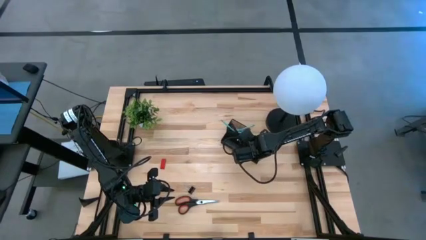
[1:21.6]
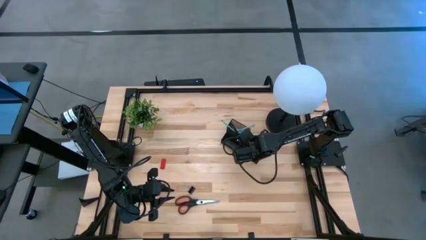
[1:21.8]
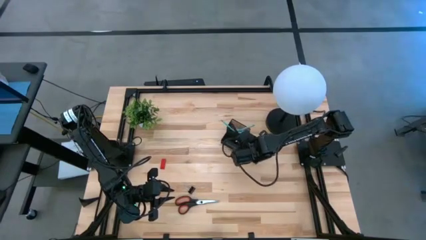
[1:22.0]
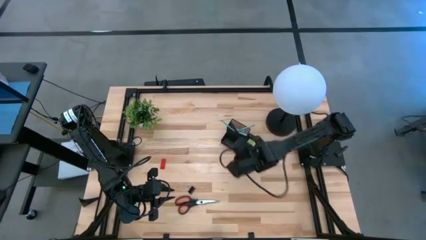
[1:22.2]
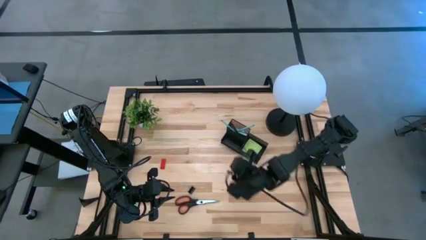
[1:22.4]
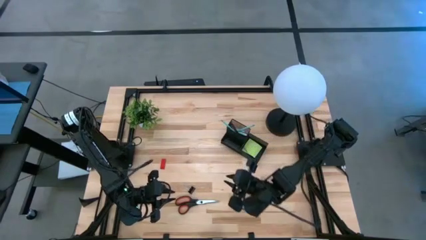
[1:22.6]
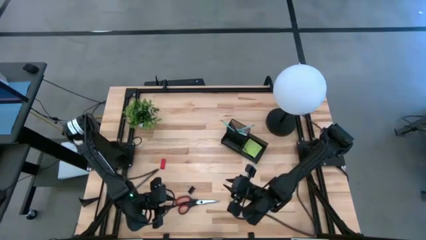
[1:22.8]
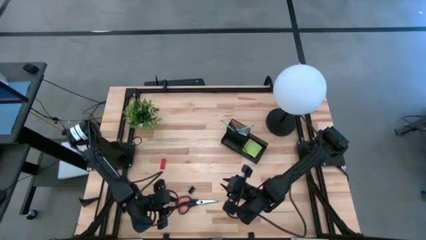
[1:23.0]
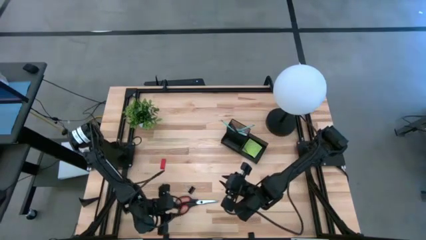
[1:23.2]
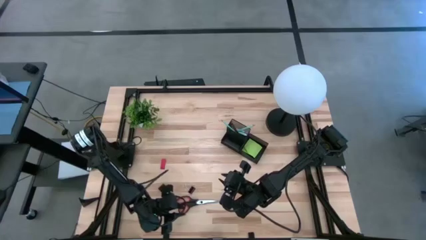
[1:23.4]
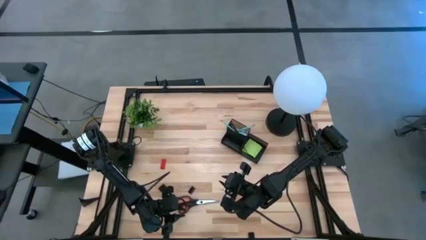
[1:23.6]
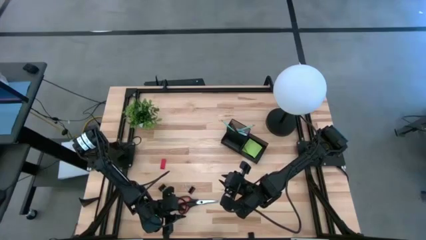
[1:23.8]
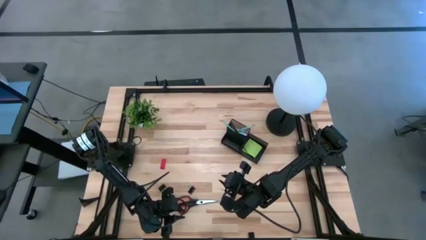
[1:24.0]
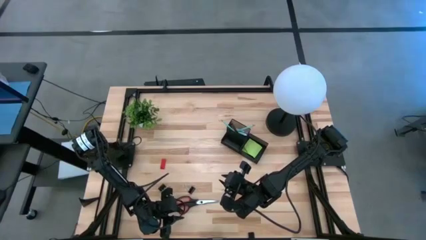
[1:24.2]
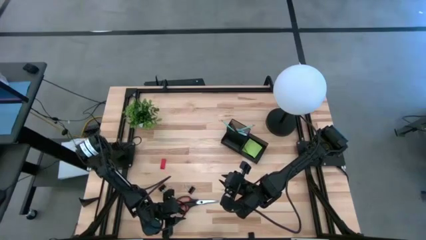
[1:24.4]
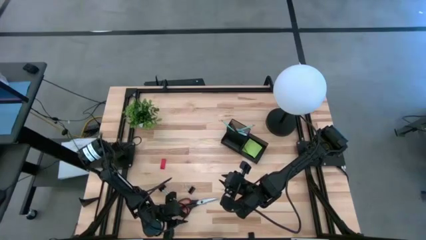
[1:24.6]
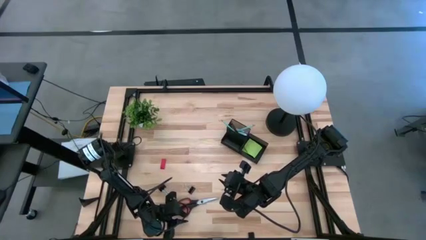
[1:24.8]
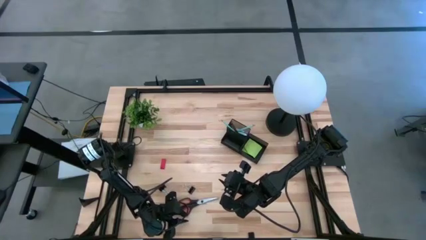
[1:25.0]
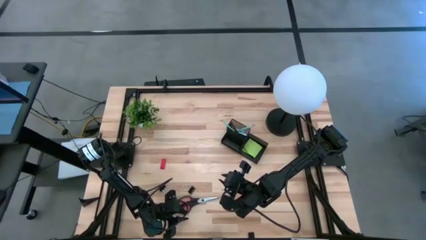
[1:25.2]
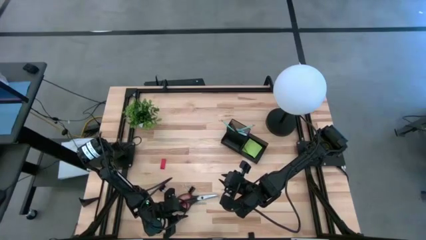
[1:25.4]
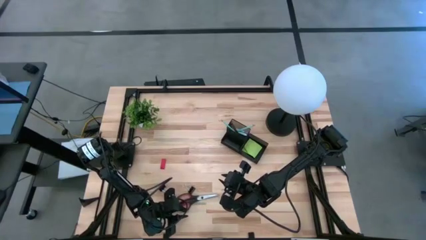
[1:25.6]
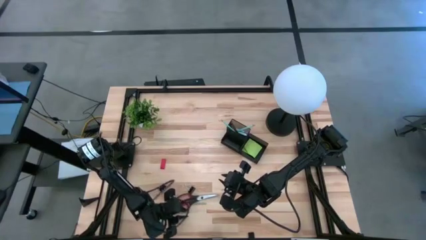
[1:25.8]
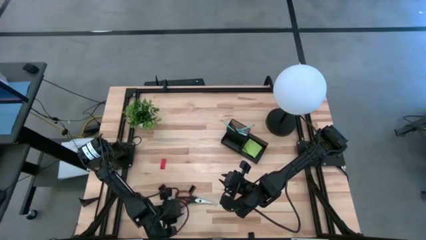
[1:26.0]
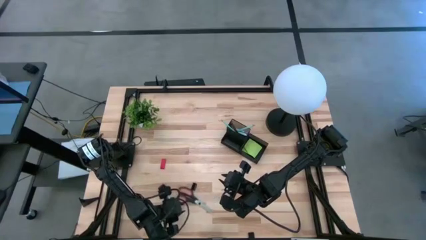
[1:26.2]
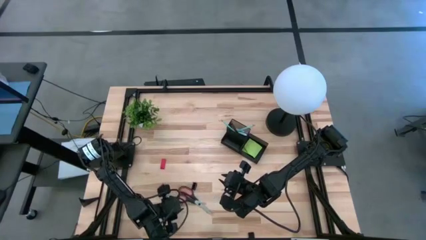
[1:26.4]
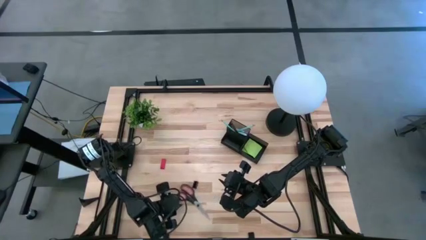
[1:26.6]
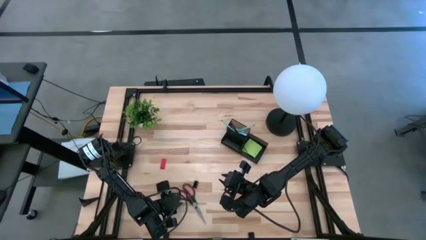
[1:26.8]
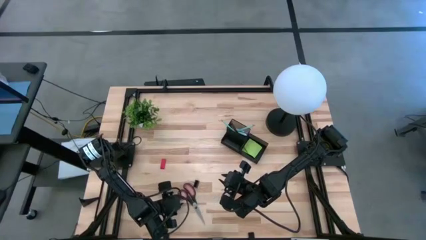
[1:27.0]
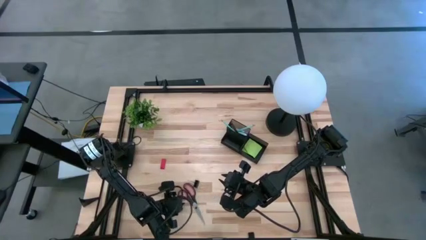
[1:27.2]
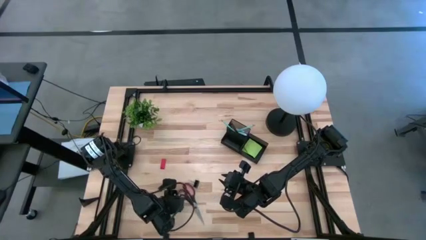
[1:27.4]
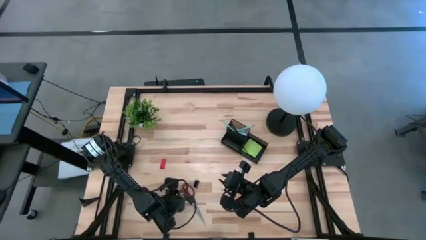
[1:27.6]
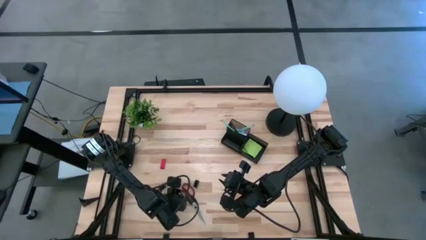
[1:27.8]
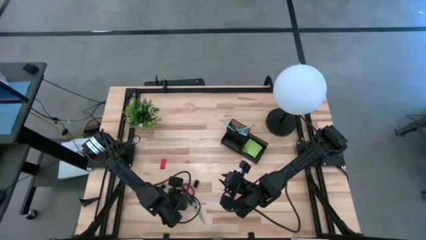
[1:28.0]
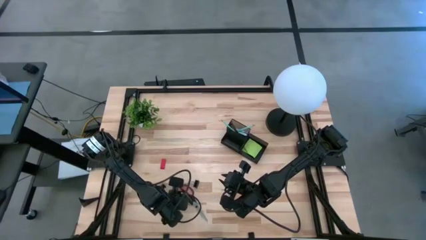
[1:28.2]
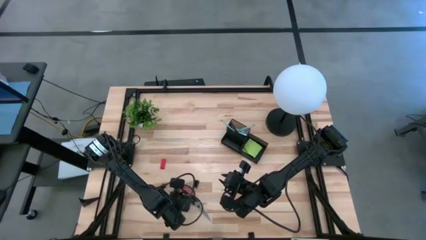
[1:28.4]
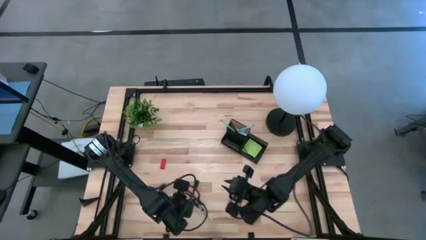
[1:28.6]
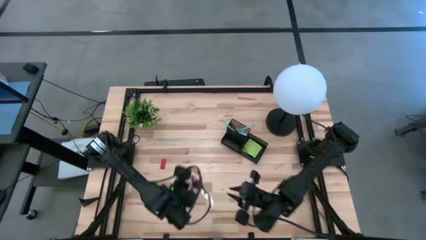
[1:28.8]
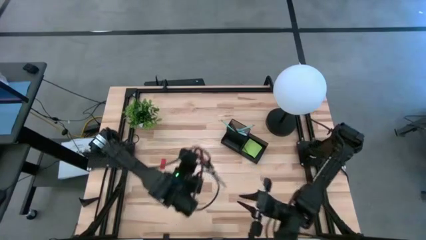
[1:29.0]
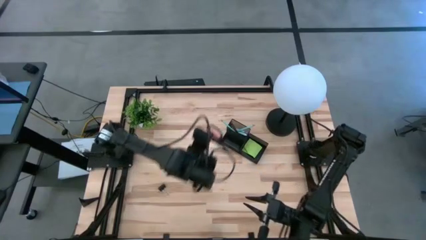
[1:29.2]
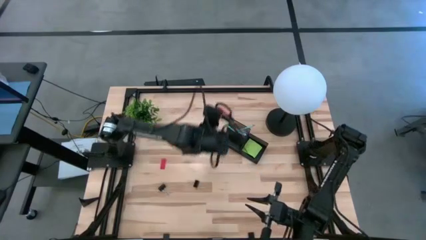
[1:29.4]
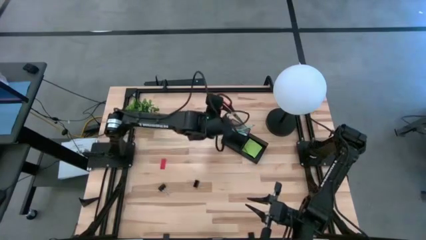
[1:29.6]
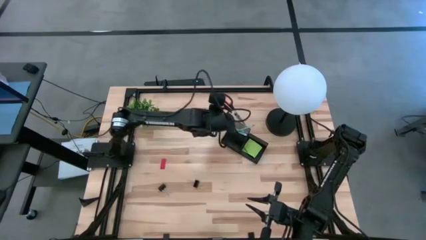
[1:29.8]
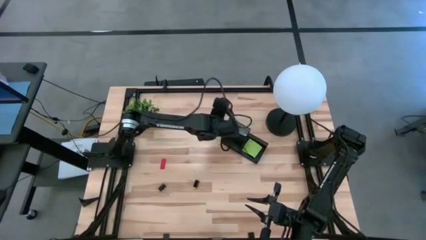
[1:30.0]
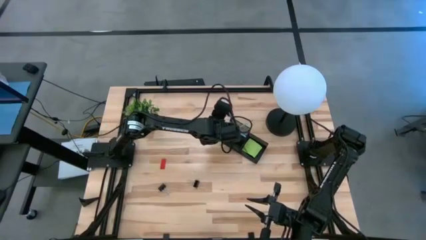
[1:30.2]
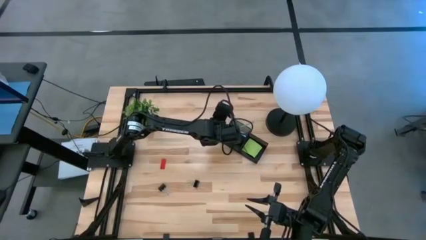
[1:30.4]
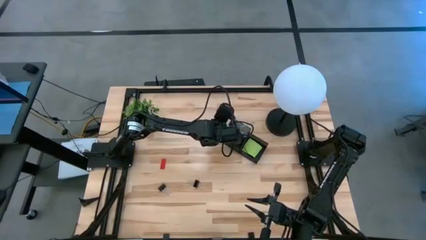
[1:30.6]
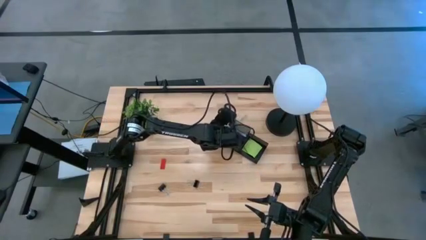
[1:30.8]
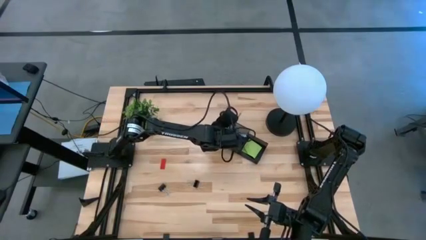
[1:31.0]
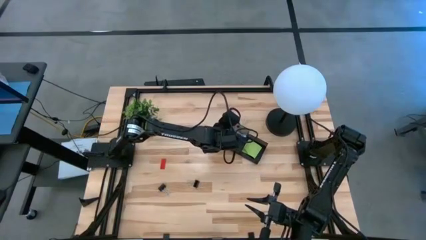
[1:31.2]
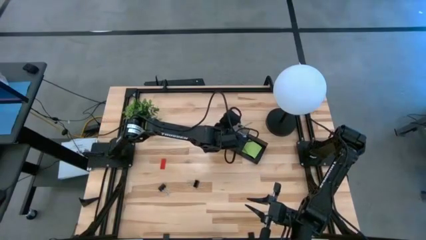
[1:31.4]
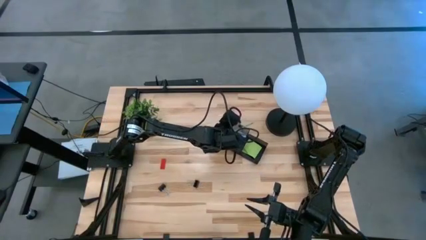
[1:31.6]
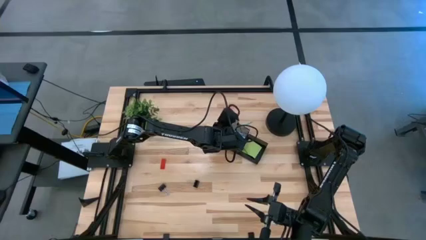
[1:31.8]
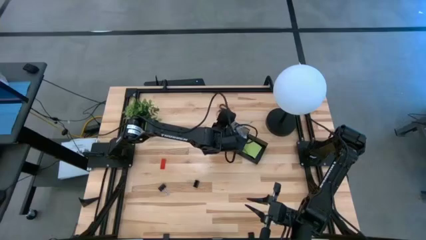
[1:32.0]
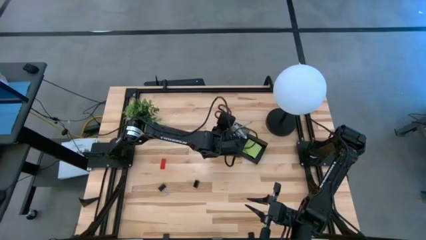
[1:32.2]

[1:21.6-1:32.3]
Task: Pick and place office supplies into organizer
Put the black scissors into the desk organizer

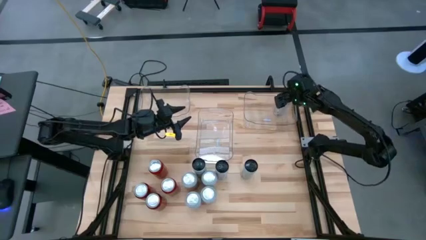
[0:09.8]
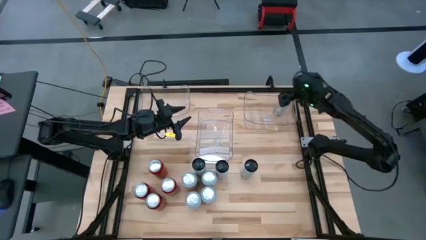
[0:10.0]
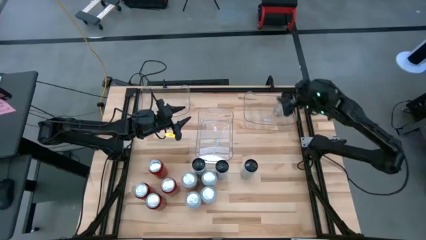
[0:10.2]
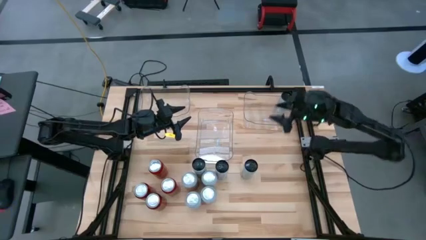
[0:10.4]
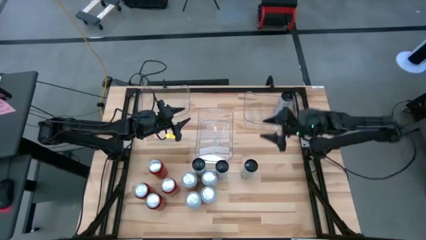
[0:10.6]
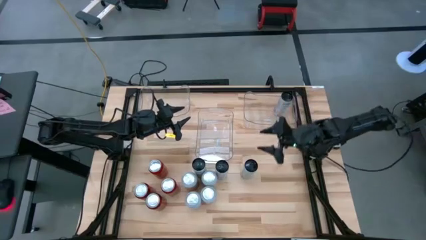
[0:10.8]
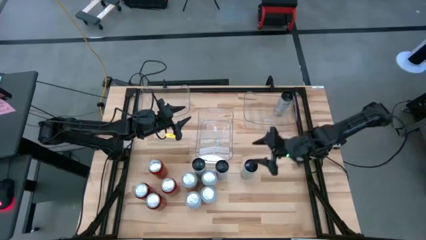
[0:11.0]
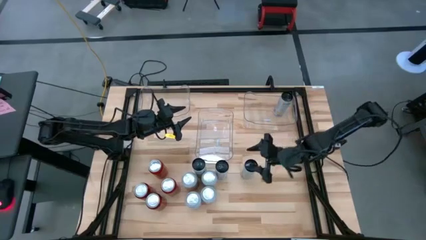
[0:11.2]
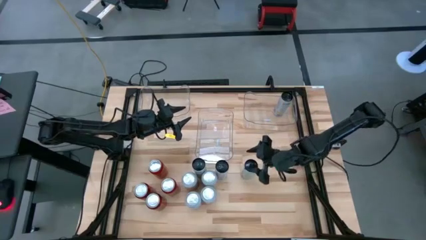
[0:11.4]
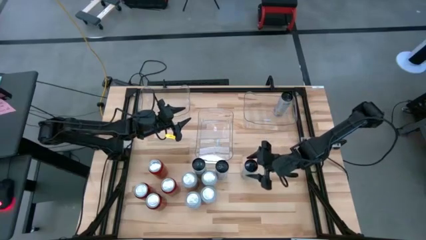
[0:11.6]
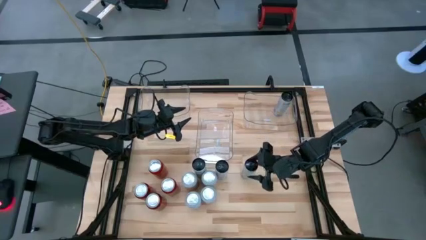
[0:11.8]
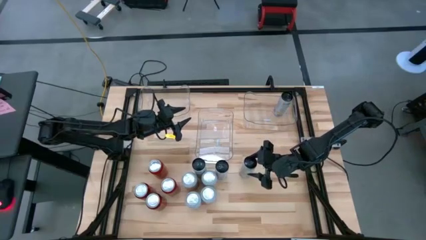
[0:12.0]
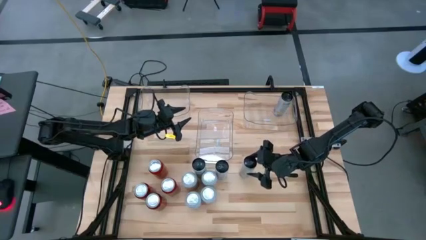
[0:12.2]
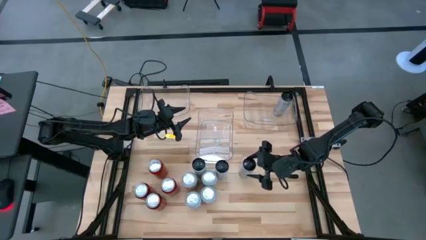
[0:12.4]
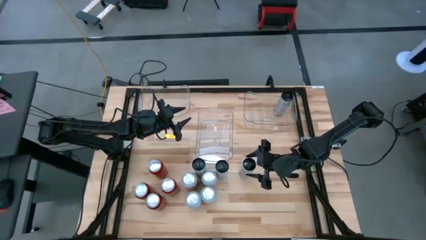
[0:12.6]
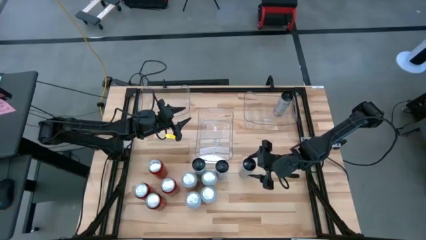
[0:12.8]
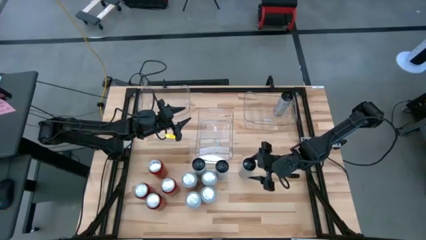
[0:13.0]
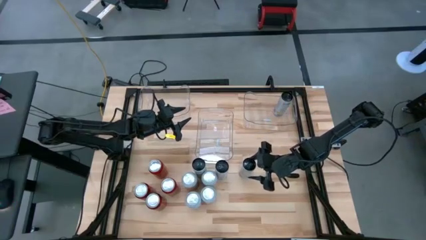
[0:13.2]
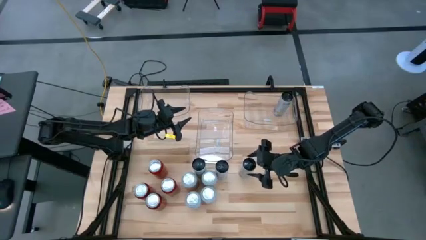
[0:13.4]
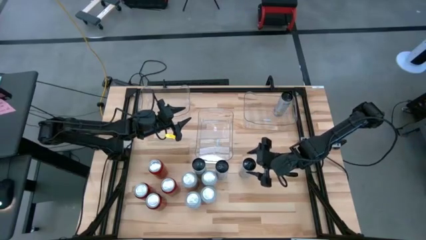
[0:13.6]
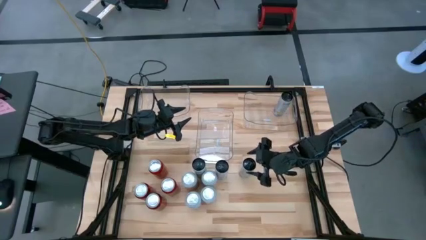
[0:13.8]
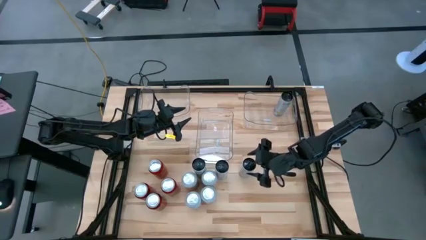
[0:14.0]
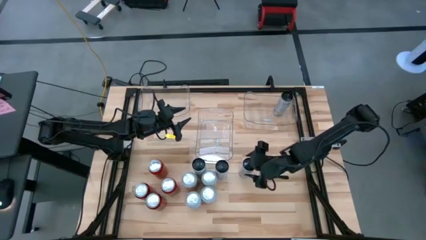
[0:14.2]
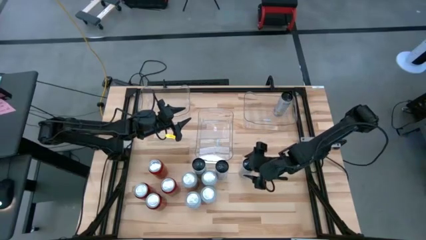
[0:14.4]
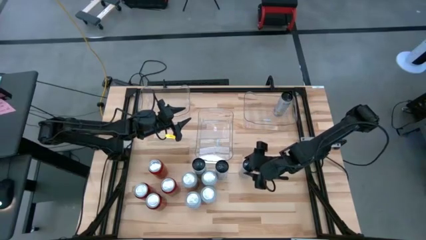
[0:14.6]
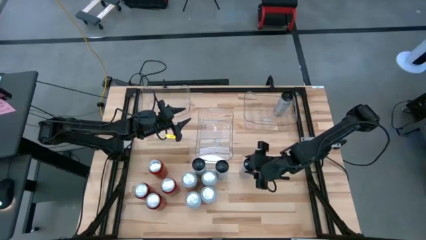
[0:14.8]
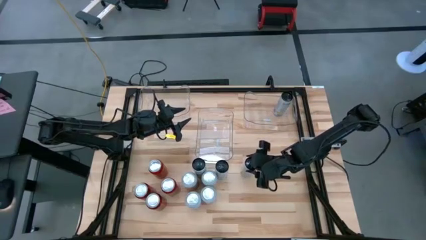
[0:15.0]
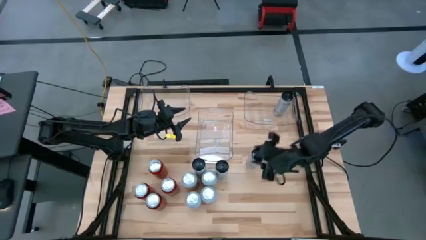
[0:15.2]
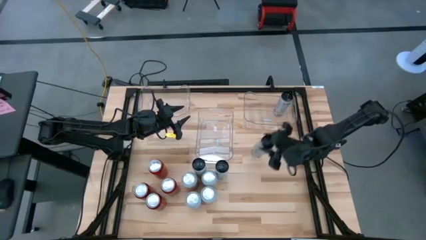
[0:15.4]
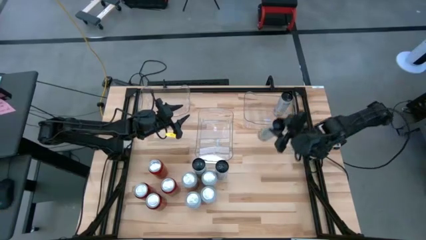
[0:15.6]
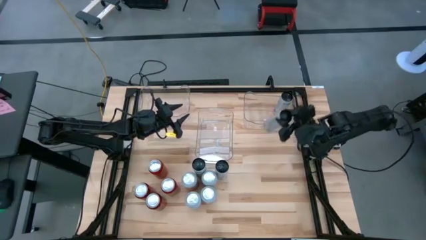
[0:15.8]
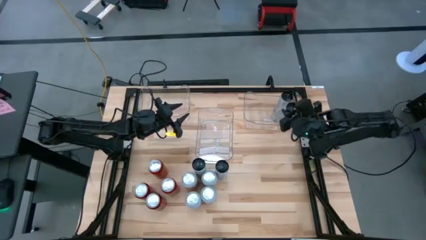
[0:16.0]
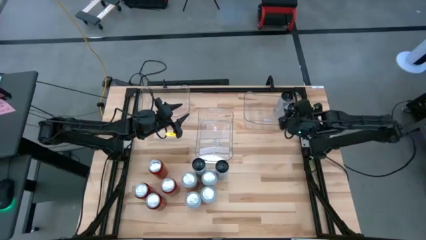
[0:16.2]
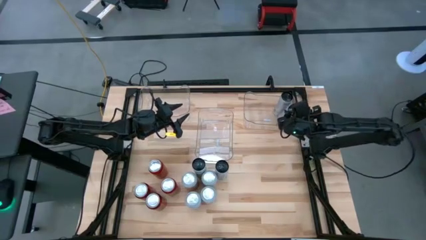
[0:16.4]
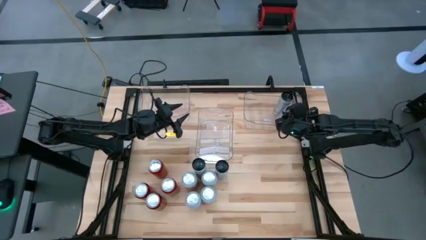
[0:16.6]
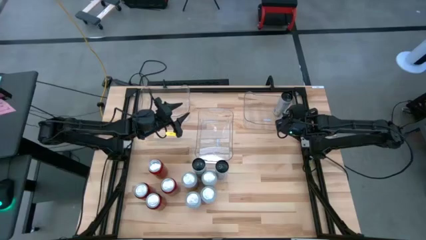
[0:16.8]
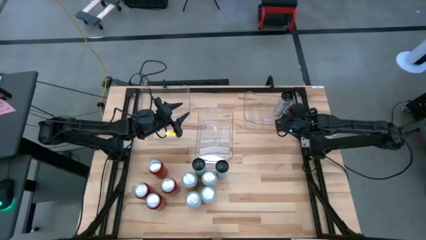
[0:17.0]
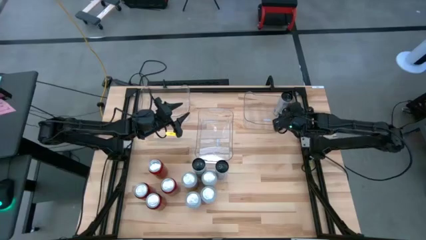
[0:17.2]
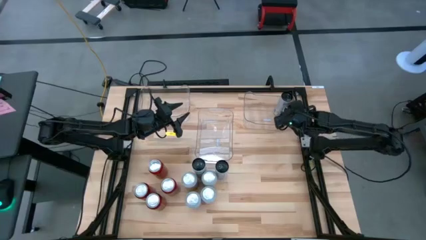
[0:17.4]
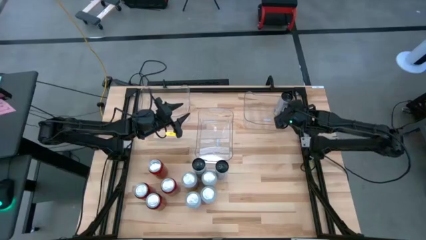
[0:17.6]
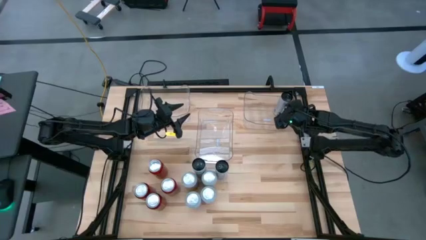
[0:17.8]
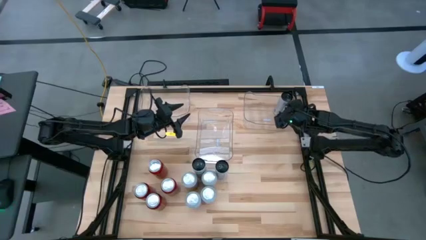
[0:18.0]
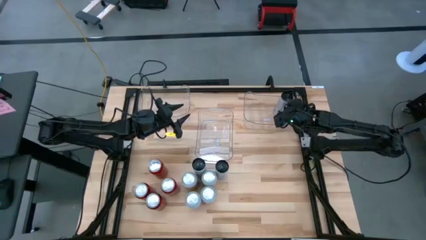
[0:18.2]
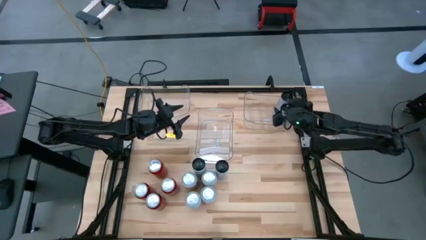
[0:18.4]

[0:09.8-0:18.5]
Task: Sort soda cans
Put the right black and white soda can in the right transparent bin
